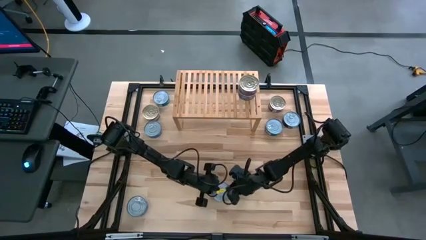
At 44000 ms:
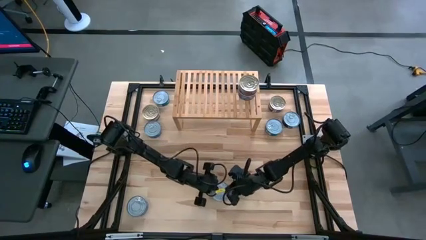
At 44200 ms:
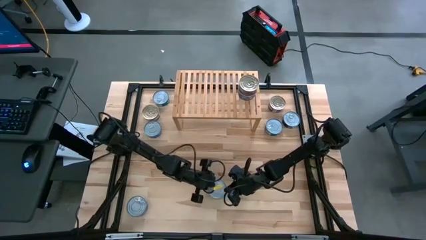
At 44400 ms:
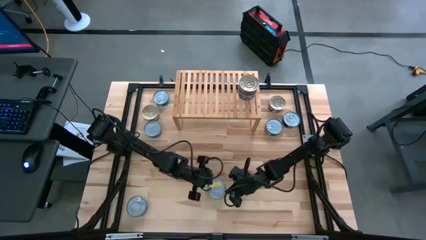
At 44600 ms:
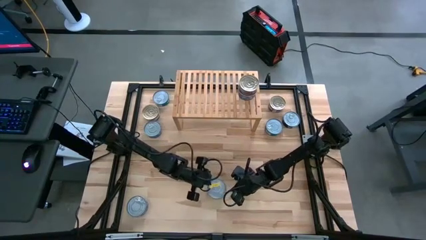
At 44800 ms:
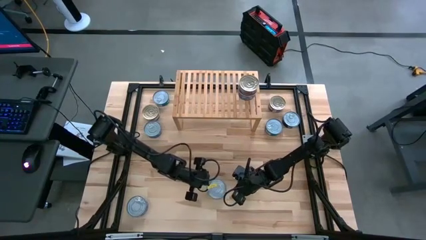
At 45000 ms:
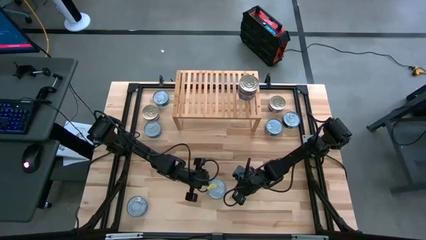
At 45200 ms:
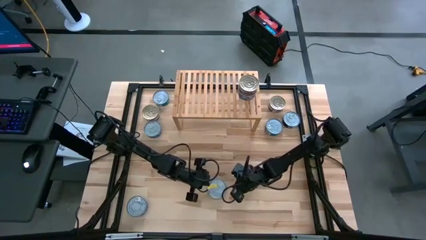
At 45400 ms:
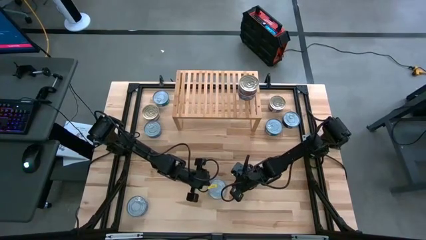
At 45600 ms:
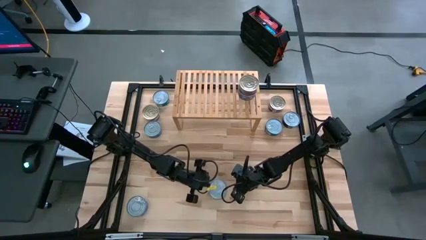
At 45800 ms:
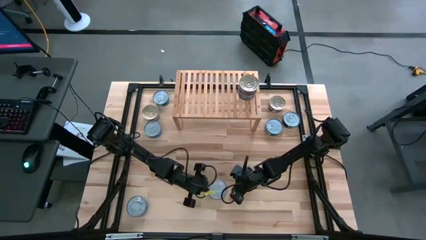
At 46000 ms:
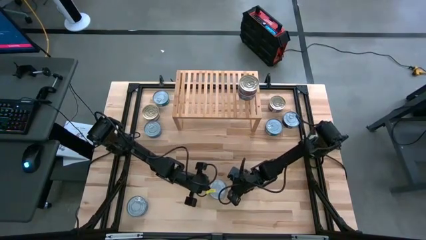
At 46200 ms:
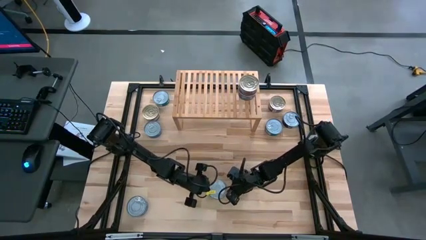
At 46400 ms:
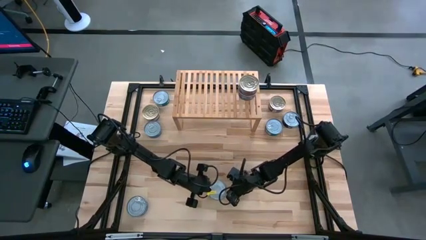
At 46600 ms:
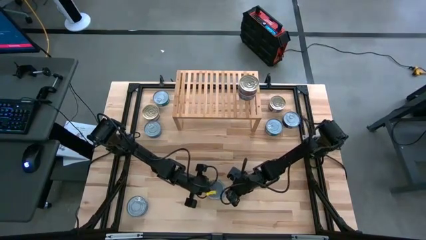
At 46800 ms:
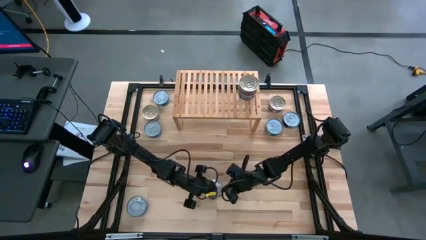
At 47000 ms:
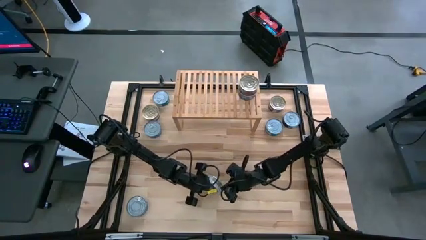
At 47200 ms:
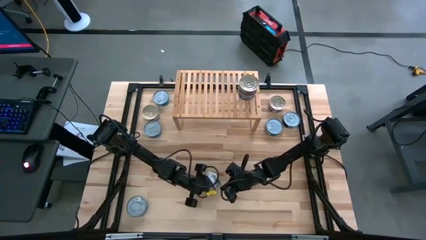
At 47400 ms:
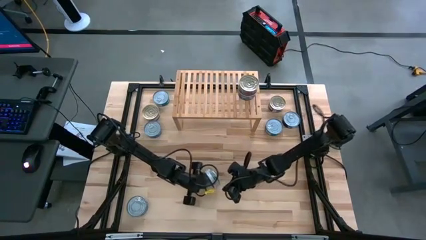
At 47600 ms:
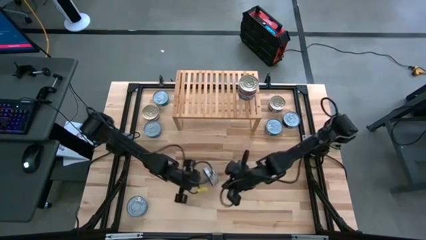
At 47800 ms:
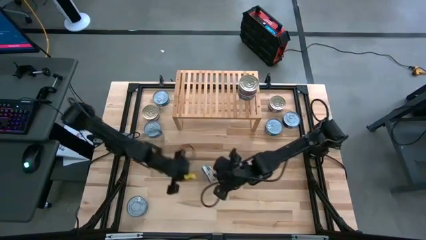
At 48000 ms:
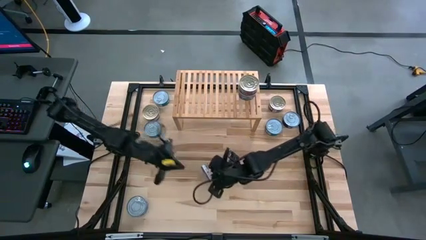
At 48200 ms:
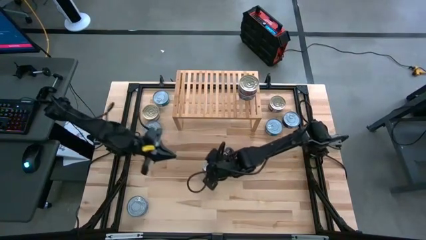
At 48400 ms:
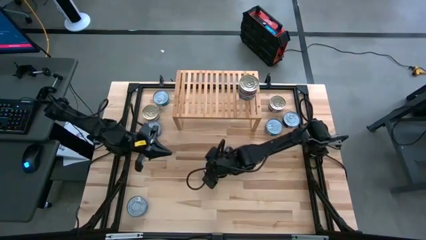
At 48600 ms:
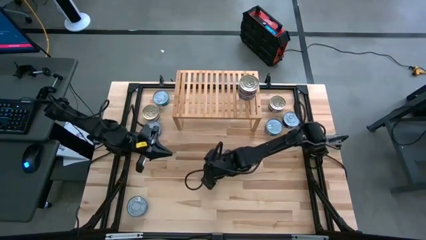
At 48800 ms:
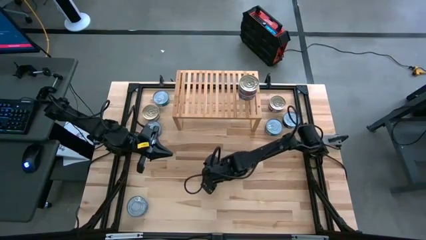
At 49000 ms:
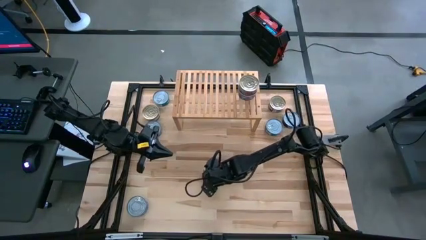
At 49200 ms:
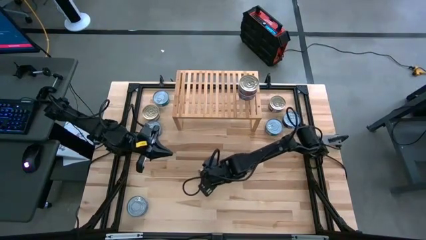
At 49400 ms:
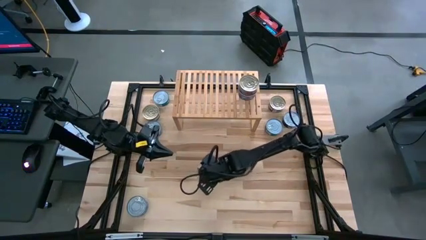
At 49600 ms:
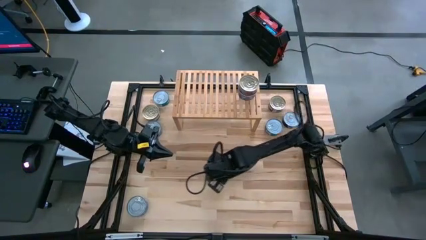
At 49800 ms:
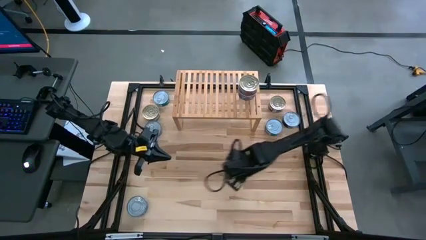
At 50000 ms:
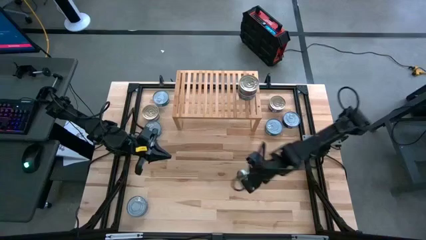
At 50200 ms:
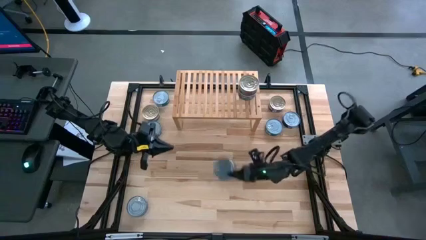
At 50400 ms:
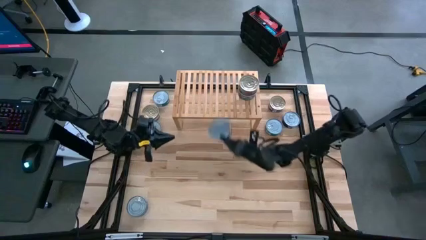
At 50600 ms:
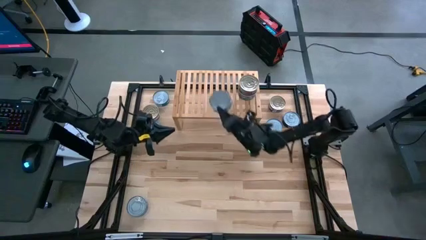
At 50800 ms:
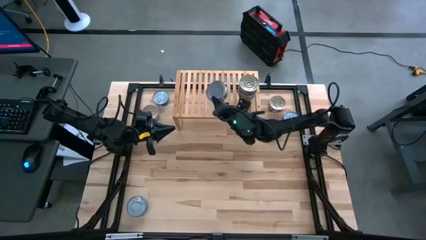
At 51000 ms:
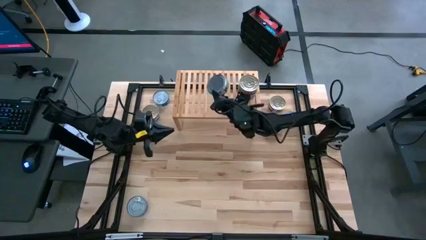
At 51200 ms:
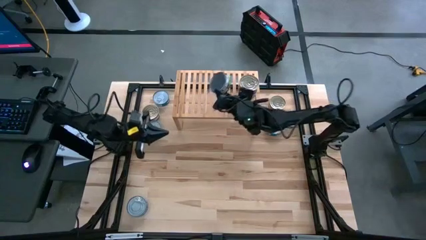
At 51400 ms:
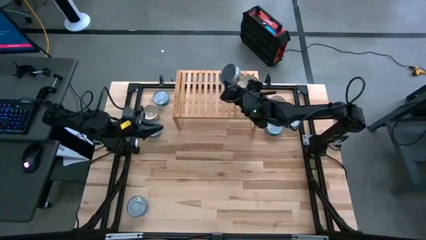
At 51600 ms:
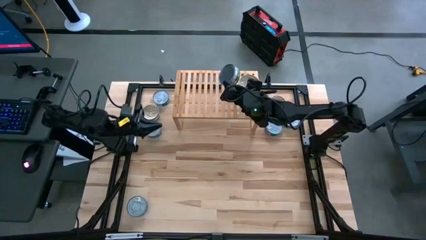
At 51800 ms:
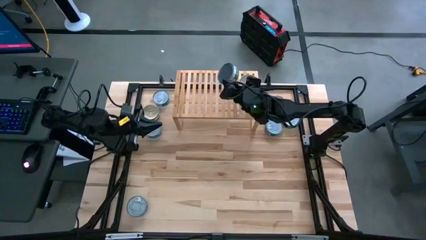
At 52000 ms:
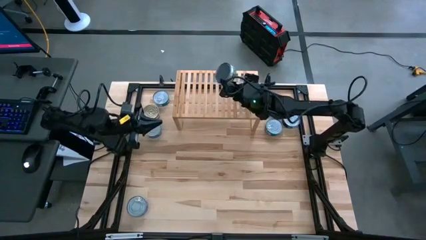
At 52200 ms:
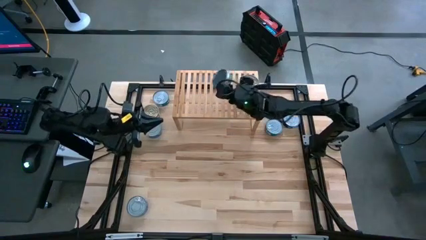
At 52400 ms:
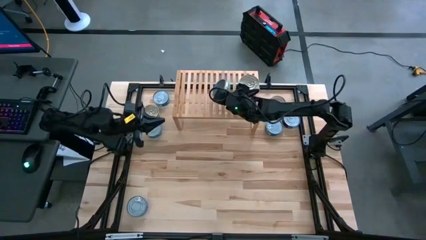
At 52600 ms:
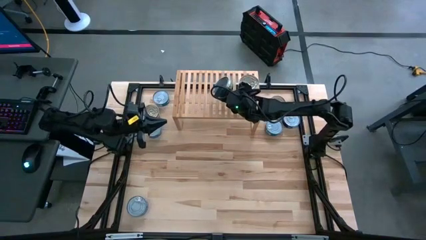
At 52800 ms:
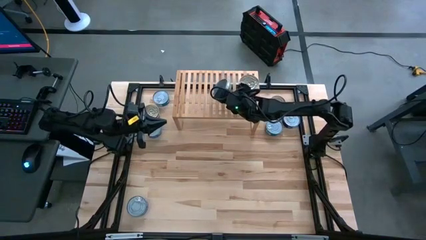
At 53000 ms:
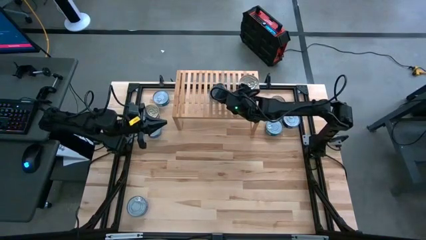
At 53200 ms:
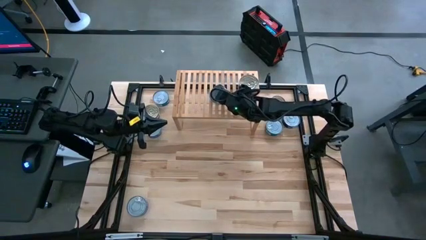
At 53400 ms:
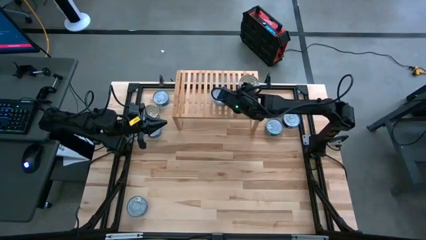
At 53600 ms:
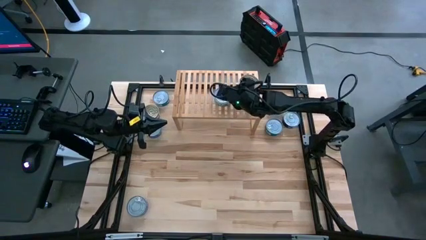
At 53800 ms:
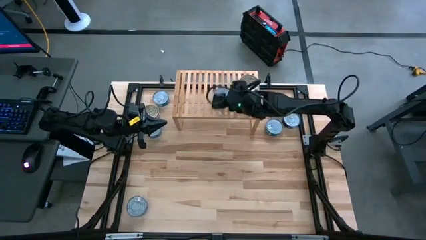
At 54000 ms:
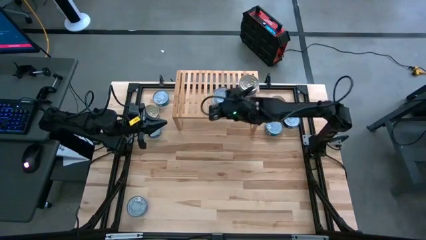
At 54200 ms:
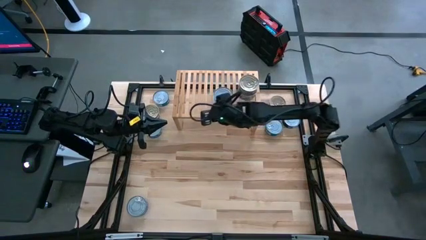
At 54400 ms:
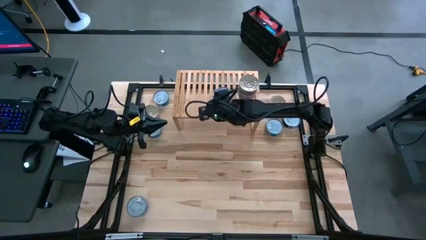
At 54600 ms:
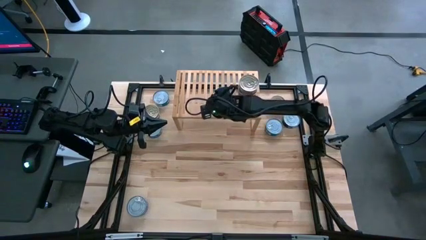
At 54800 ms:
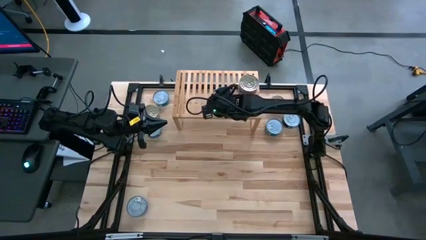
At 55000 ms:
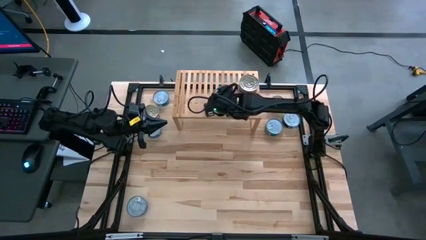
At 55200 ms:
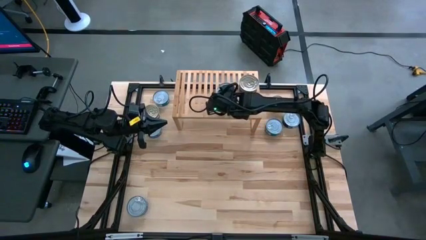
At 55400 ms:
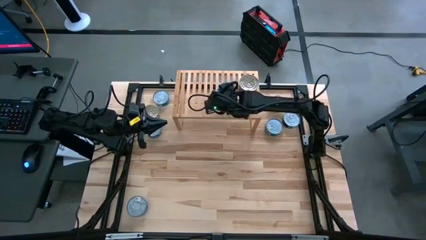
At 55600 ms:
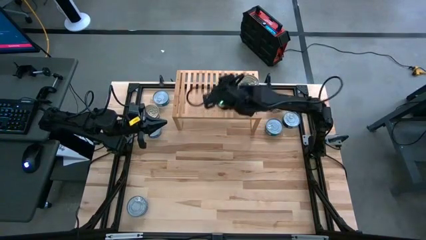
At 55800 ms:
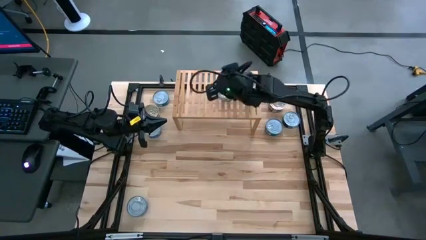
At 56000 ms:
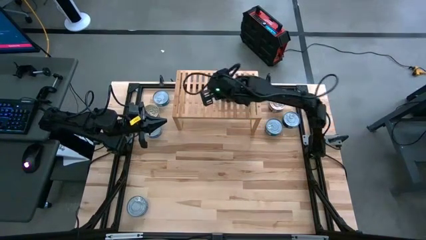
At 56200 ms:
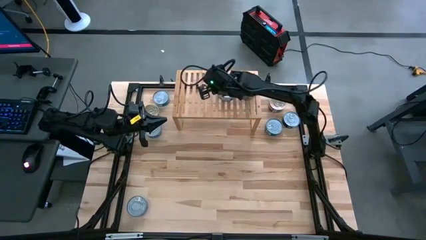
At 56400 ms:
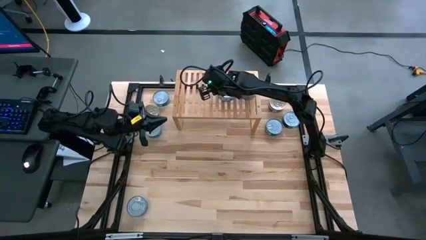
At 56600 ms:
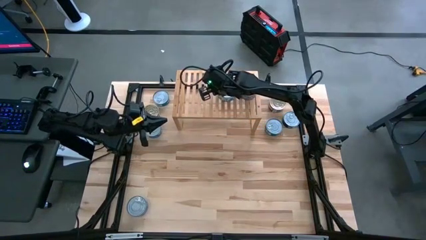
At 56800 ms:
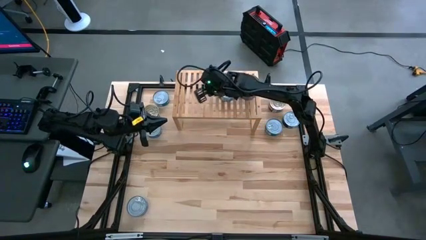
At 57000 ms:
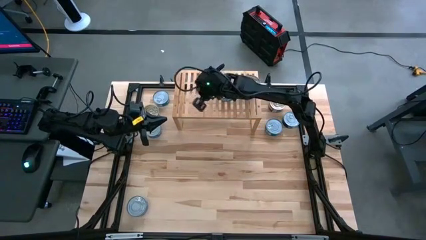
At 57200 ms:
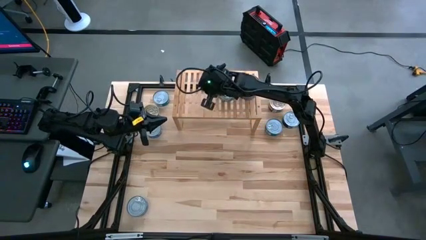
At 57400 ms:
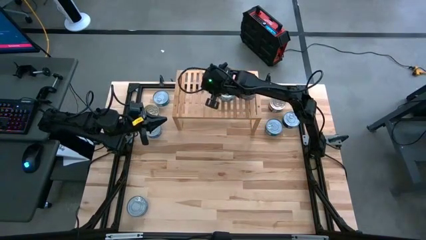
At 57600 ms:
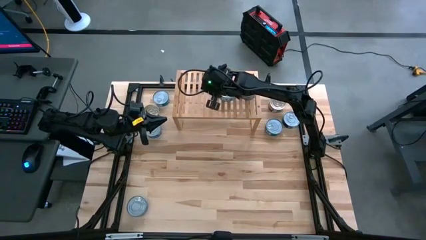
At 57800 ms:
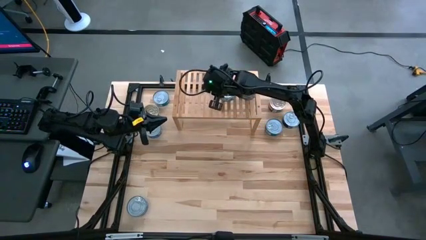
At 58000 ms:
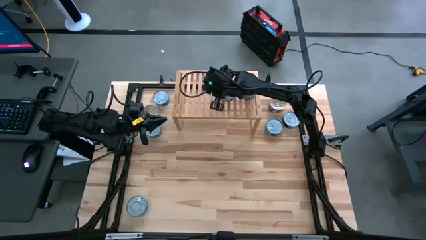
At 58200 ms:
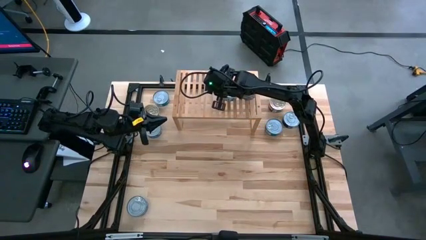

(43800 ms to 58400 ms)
Task: Stack canned seafood by type on shelf
Put the green tuna can on the shelf

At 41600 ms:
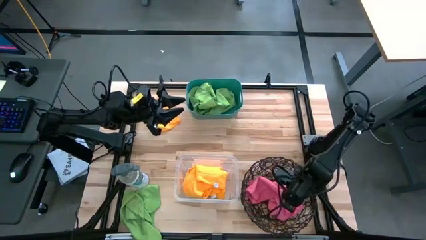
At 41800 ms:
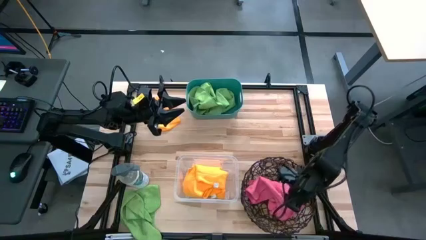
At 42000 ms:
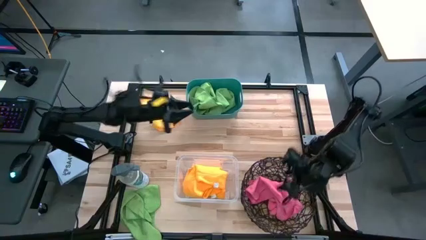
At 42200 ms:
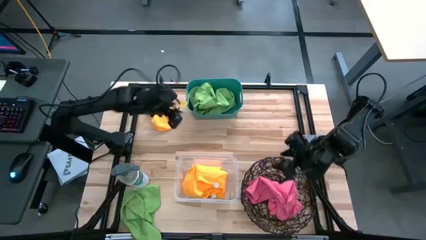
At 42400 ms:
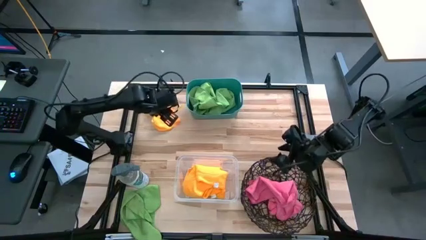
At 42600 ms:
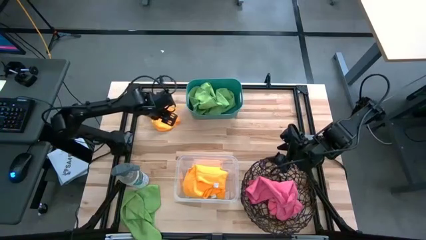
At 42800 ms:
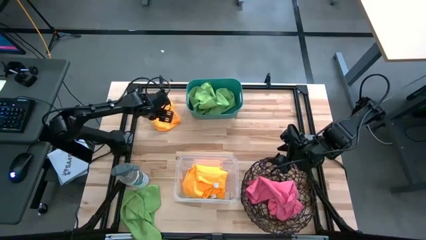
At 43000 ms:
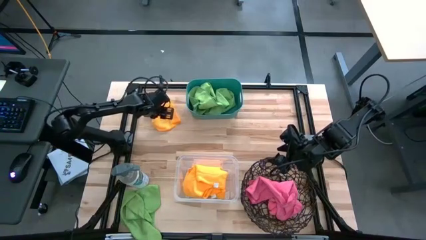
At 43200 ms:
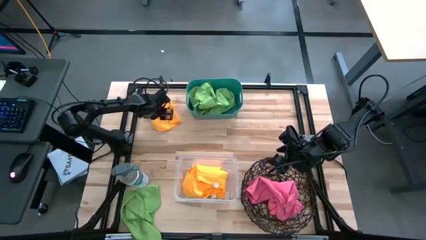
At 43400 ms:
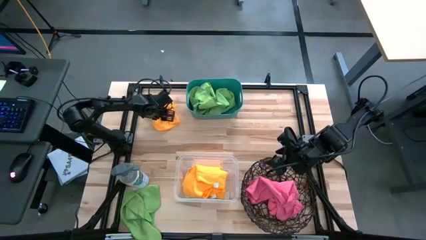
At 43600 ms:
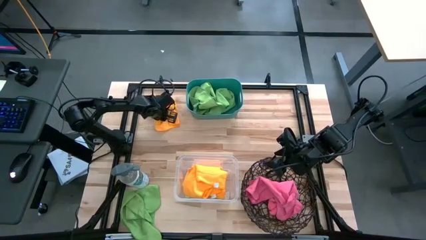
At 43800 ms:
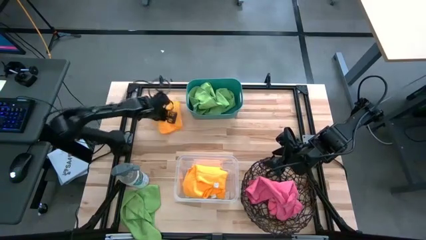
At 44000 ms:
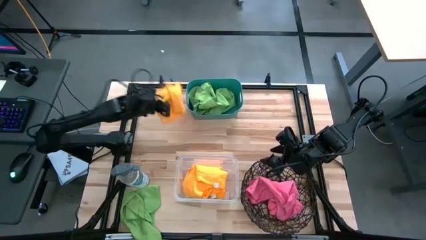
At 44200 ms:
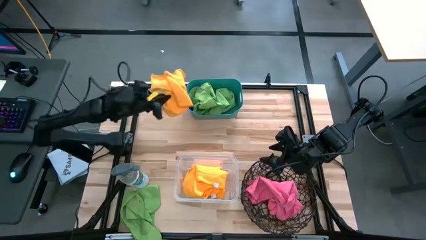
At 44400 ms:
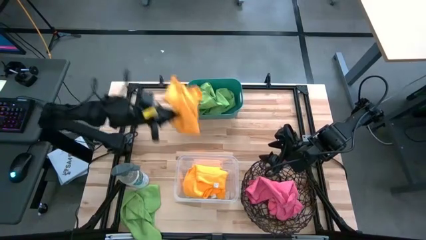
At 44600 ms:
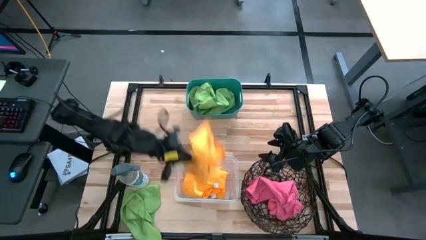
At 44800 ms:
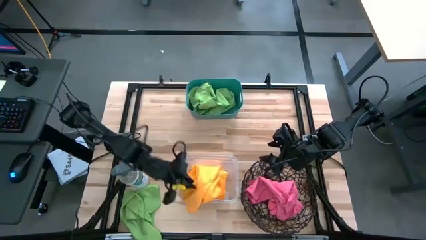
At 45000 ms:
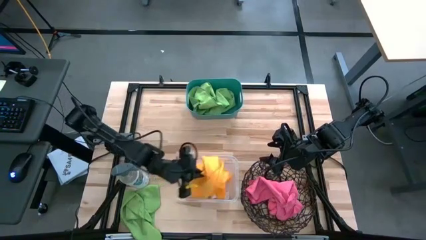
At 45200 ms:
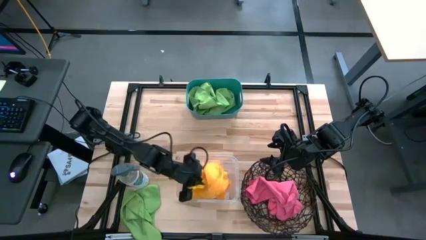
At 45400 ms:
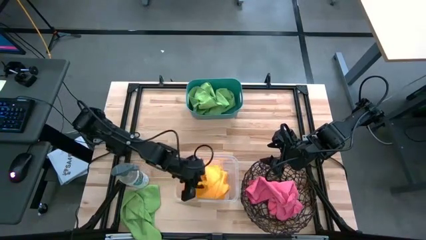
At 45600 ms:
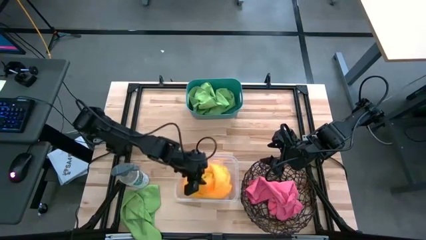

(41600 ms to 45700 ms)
Task: Sort microfiber towel by color & place in baskets
Put the light orange microfiber cloth into the transparent bin
